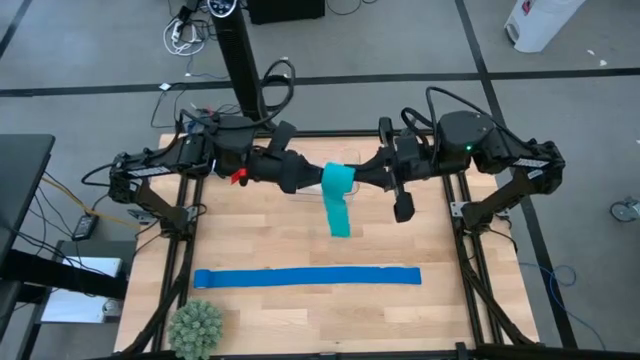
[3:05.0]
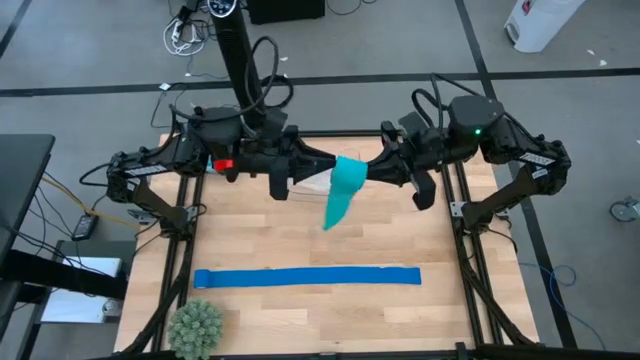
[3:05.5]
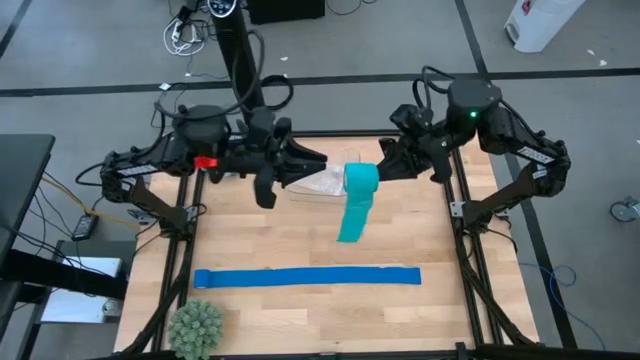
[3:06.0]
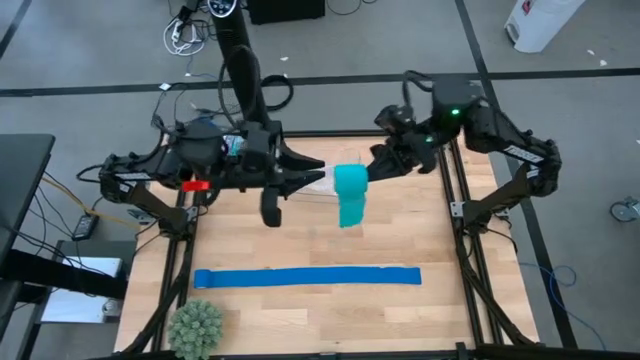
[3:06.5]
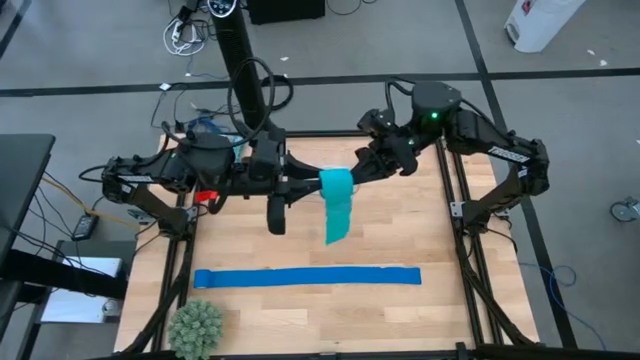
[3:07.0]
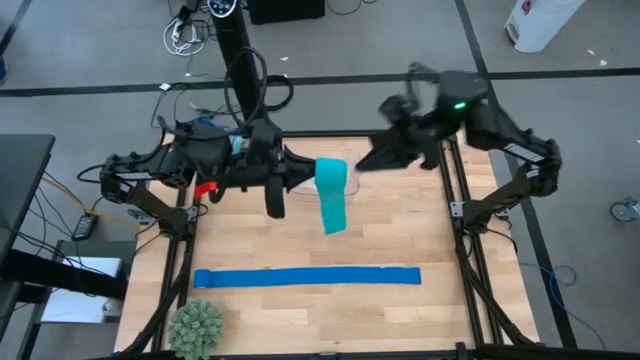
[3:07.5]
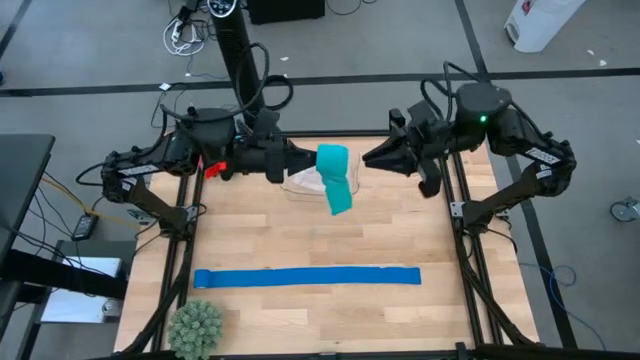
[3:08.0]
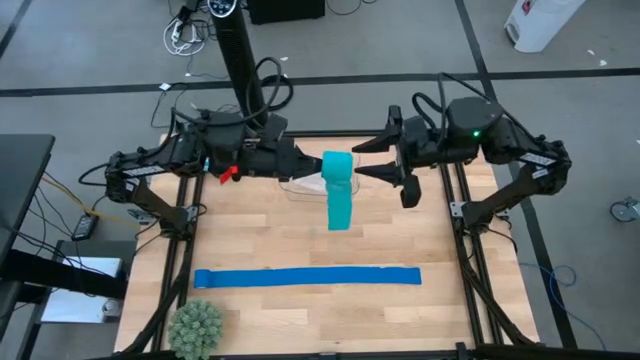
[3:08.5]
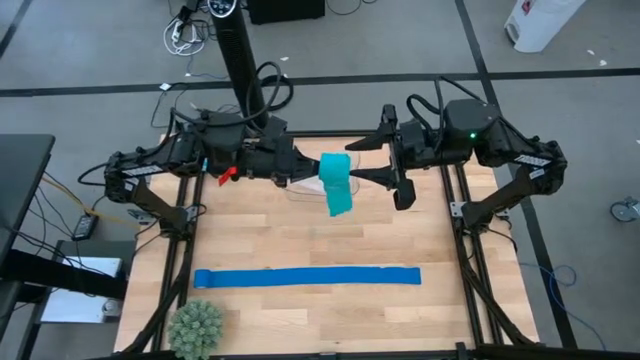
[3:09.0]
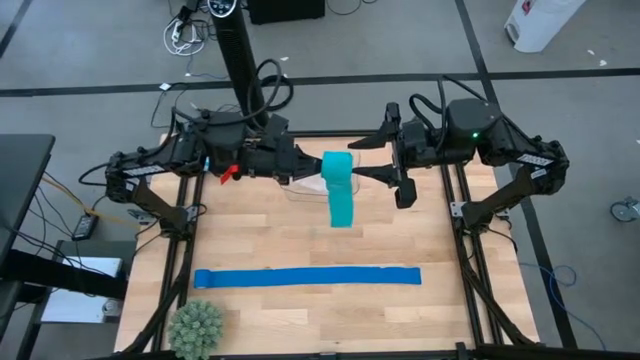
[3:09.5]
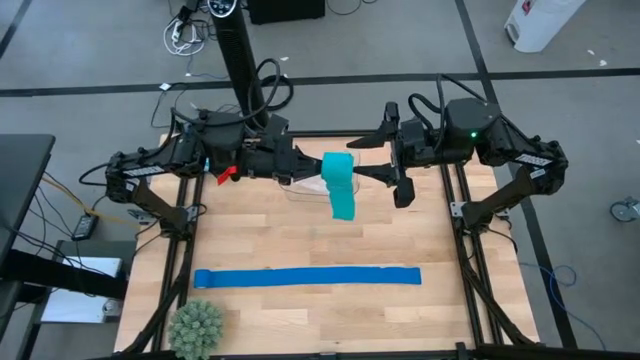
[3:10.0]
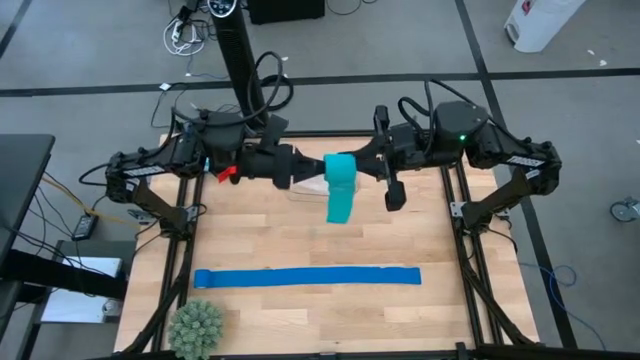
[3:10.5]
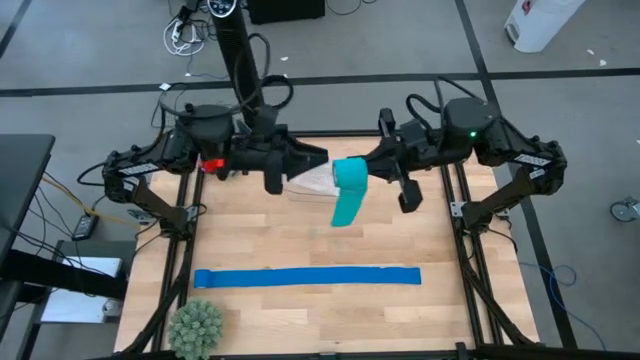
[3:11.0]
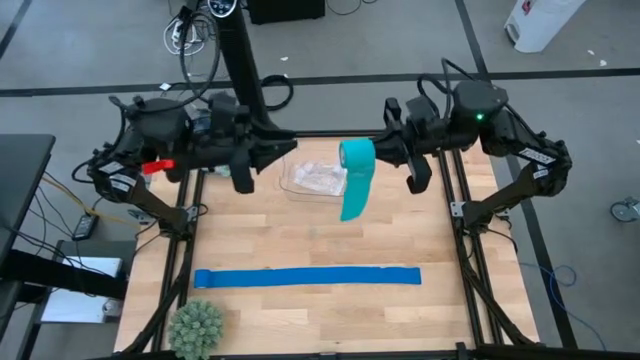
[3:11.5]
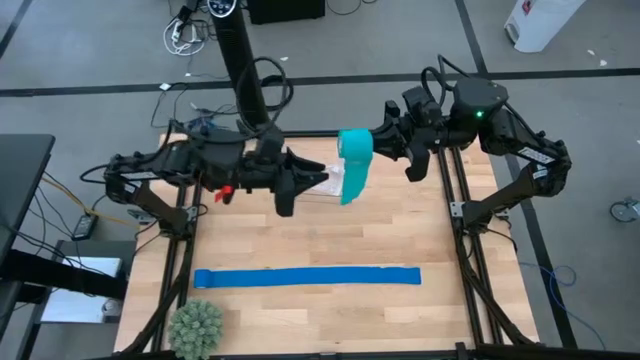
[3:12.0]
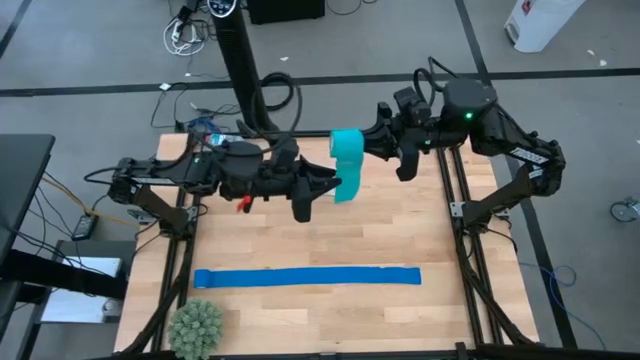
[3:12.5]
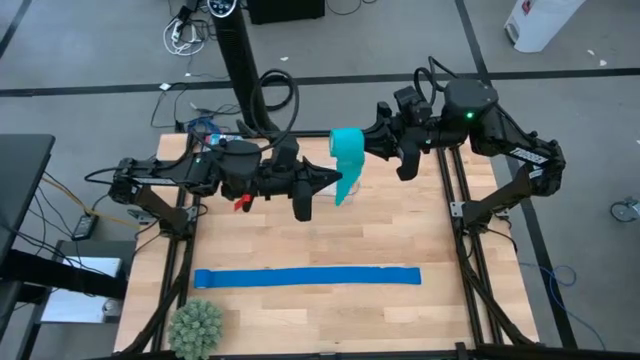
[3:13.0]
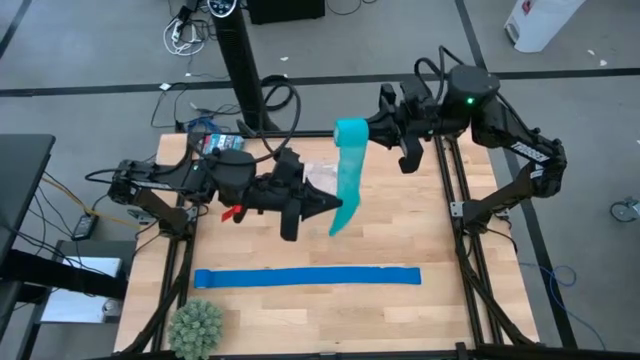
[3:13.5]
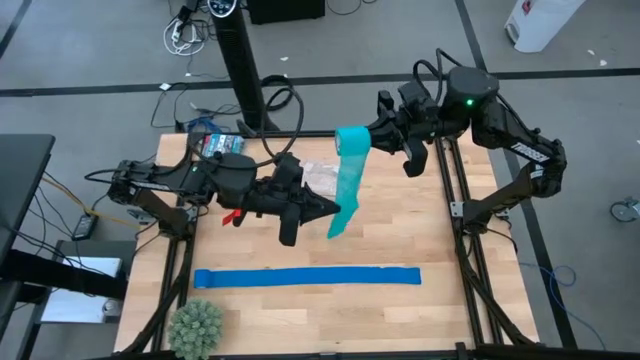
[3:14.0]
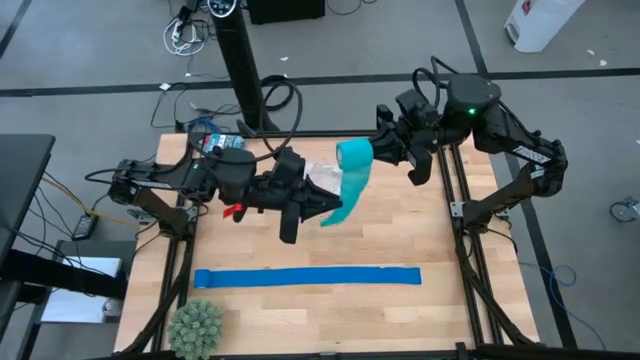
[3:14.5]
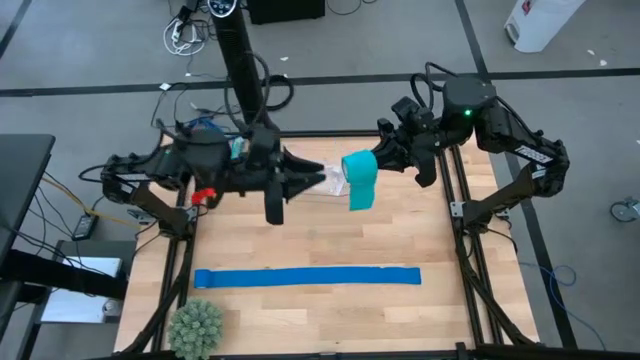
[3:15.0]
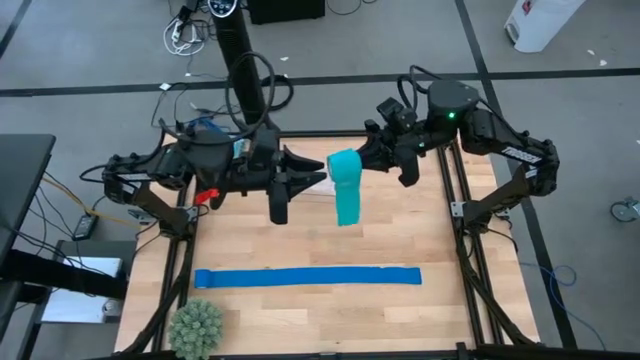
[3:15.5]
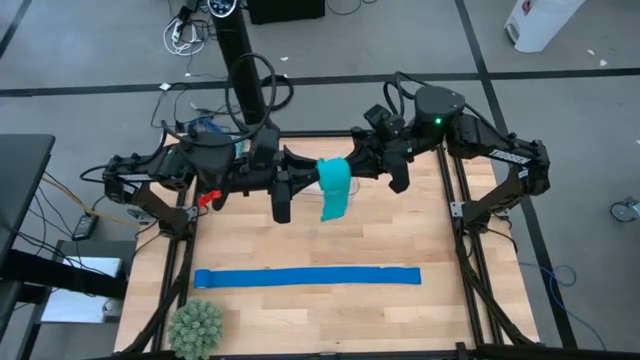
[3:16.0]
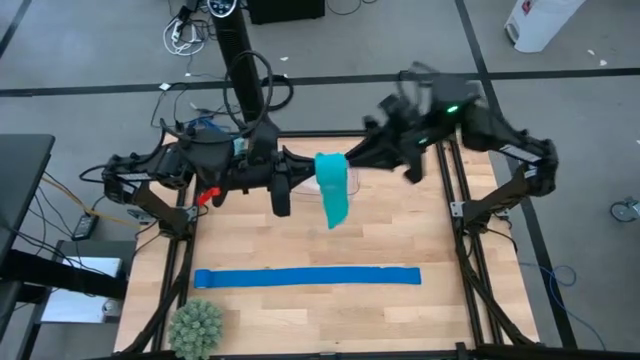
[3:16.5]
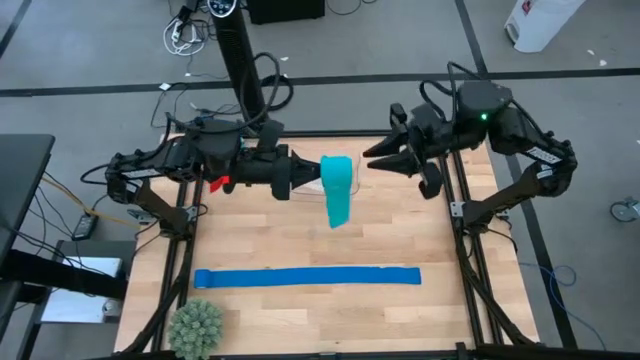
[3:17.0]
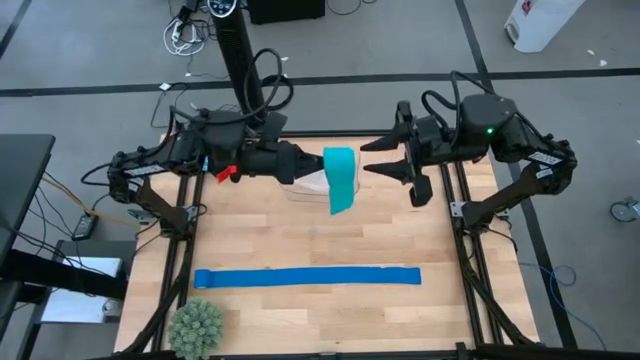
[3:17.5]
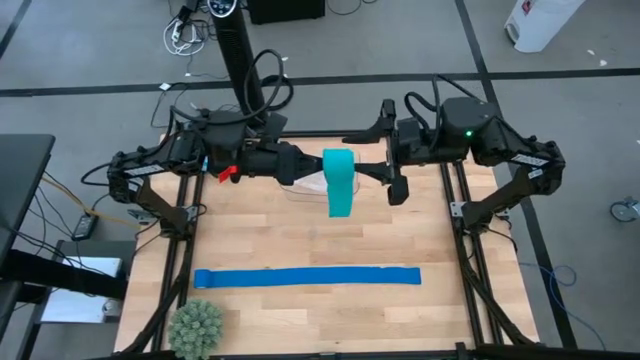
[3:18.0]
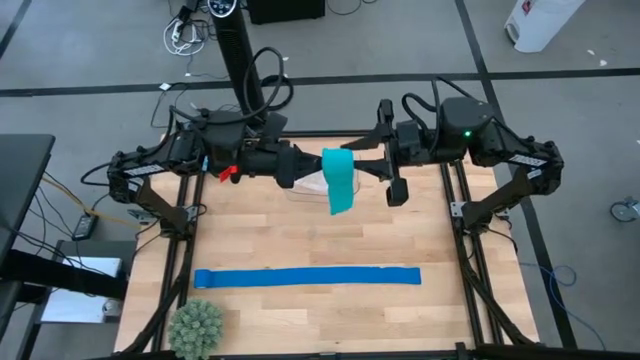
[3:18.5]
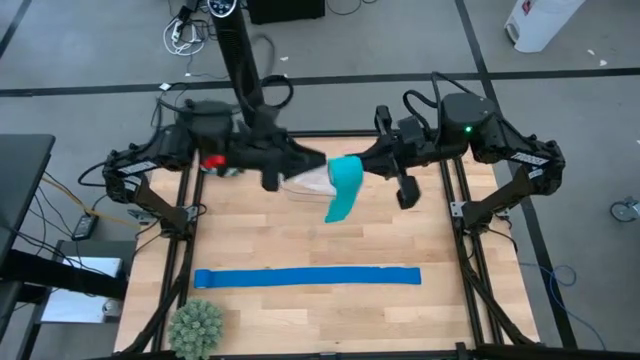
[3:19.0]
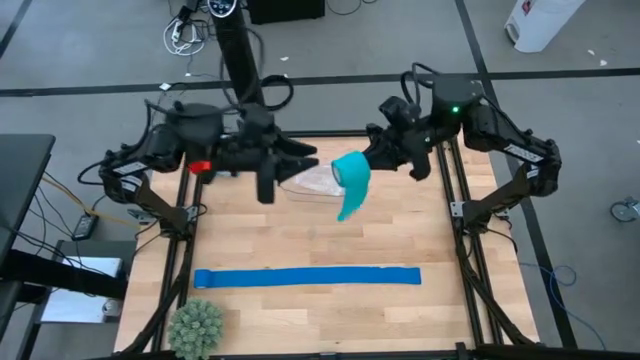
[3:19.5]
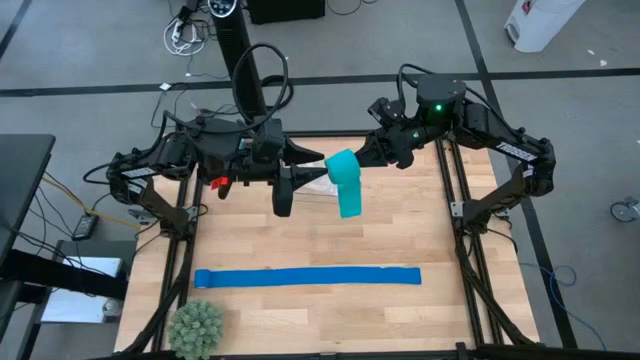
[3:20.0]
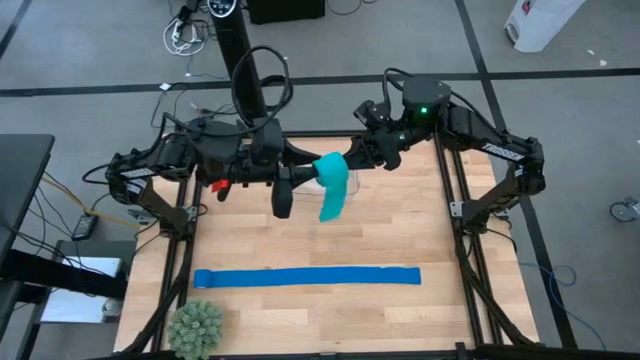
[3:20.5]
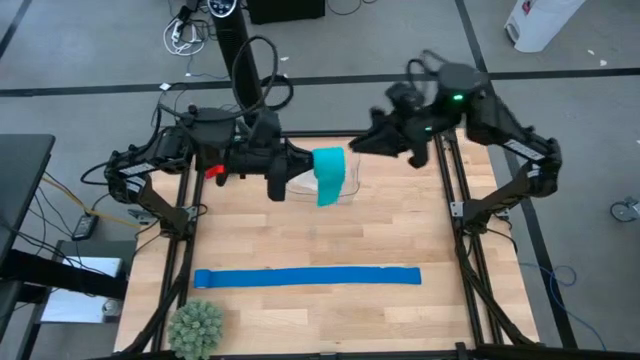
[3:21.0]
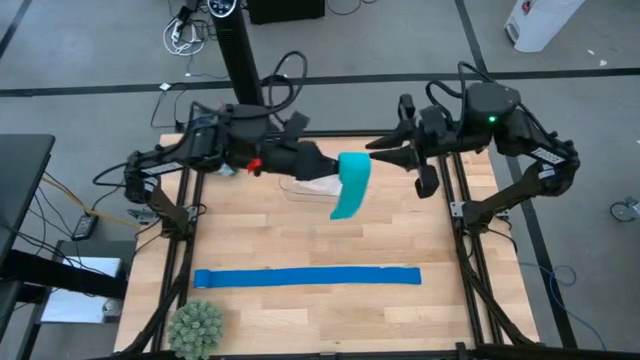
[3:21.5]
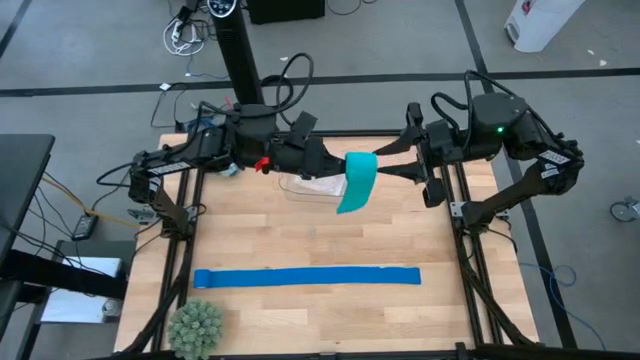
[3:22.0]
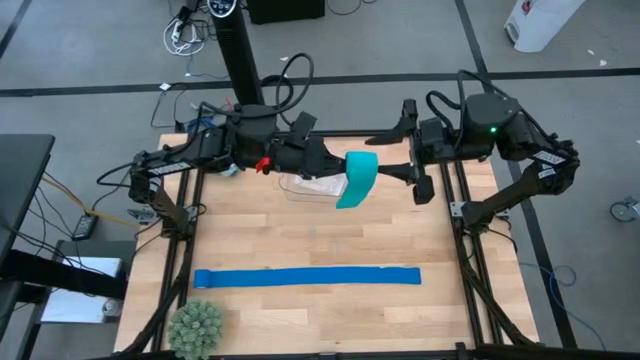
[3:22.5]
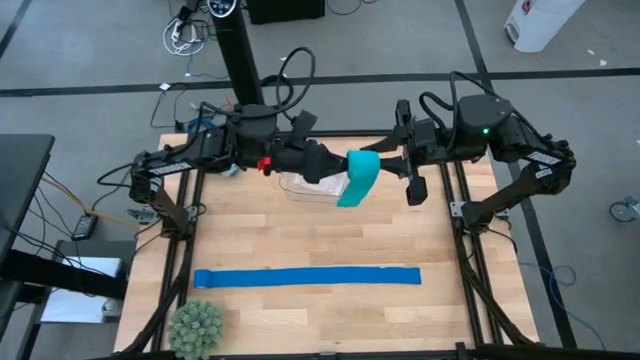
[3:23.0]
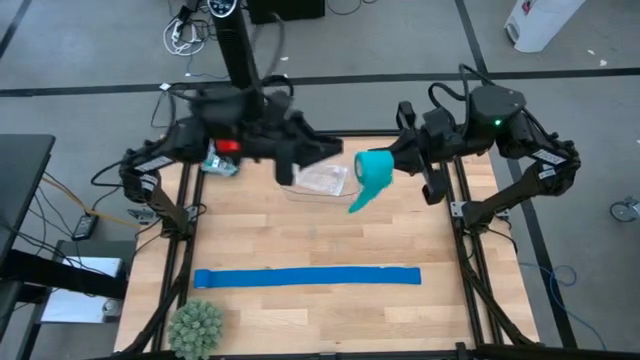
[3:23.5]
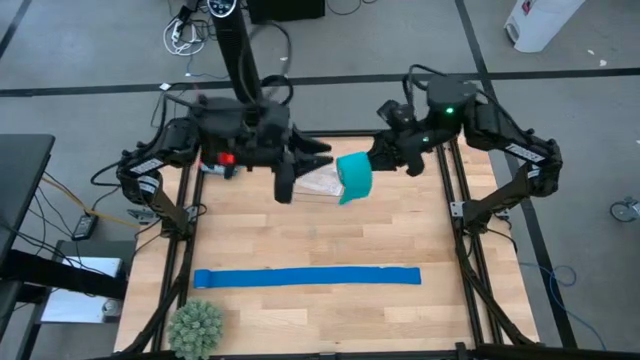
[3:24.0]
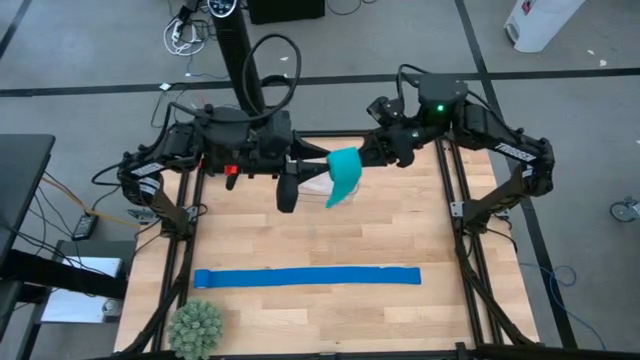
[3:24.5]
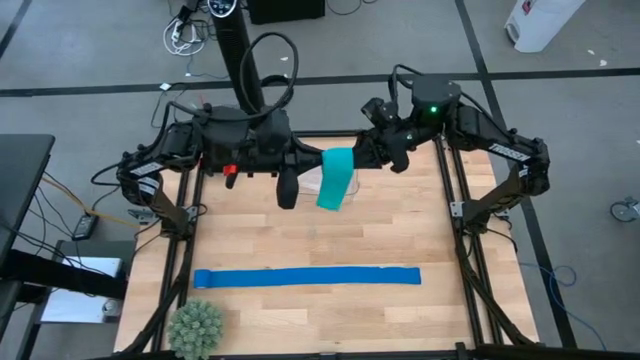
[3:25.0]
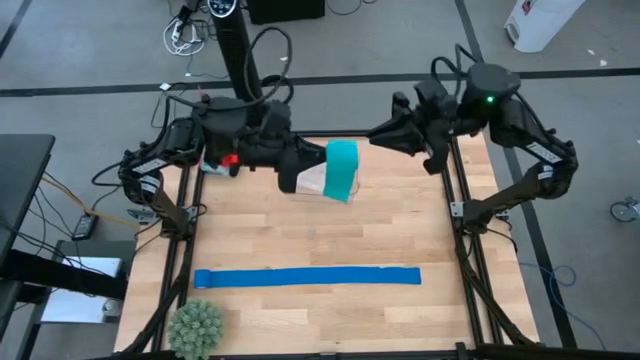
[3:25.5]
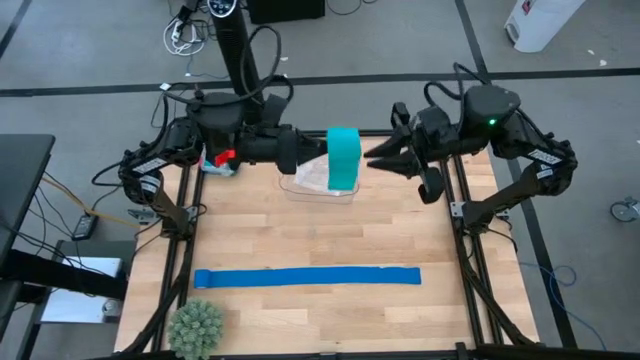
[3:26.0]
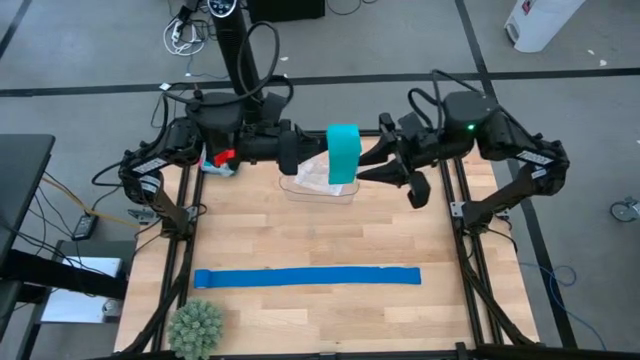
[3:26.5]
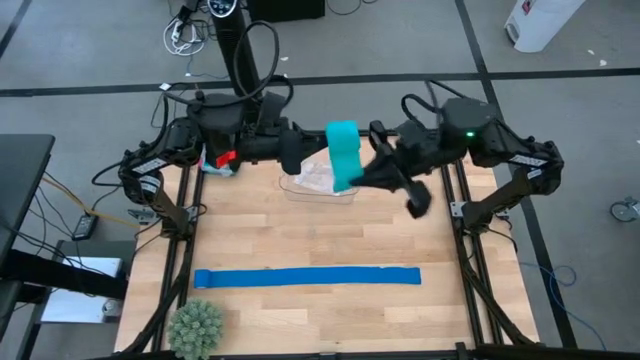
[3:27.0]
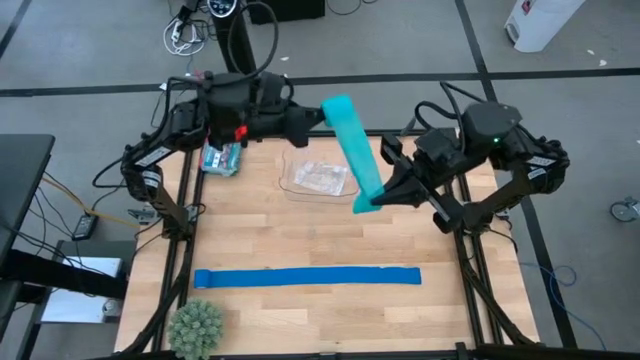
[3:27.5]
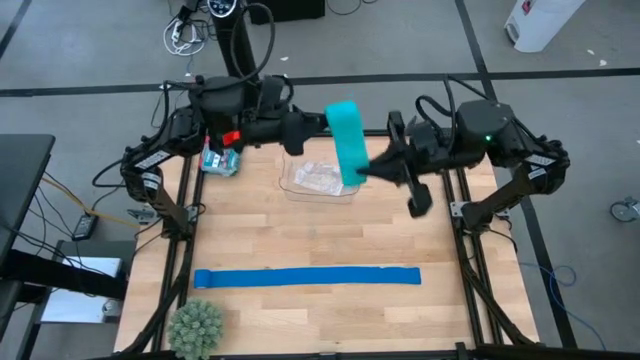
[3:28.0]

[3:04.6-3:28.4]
Task: Roll bandage
Roll the green bandage
